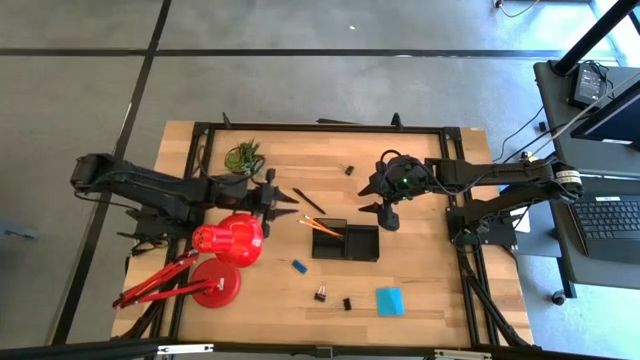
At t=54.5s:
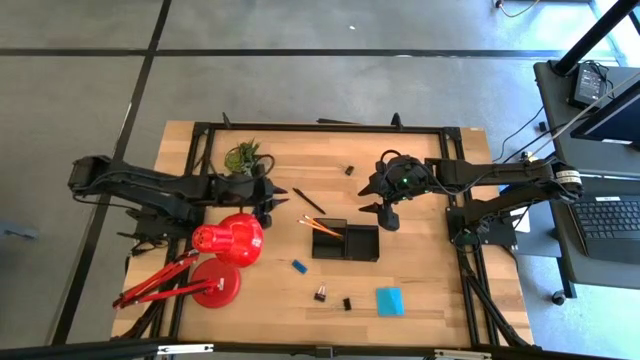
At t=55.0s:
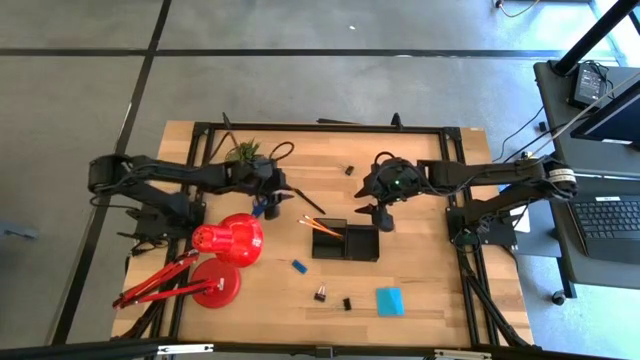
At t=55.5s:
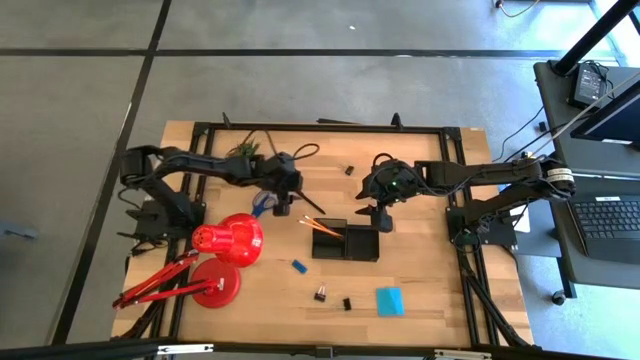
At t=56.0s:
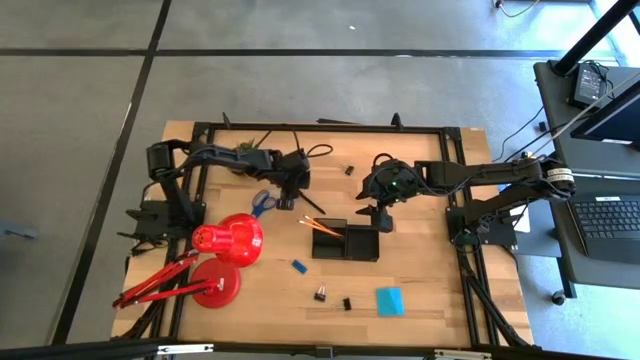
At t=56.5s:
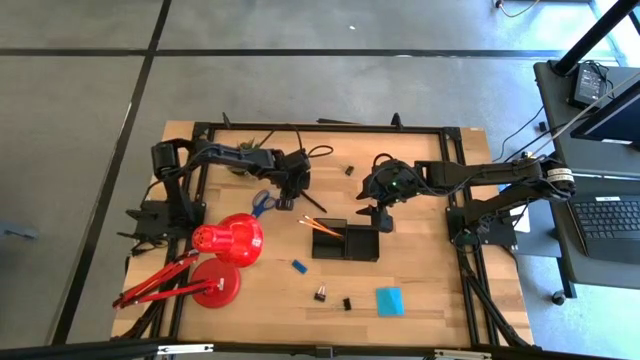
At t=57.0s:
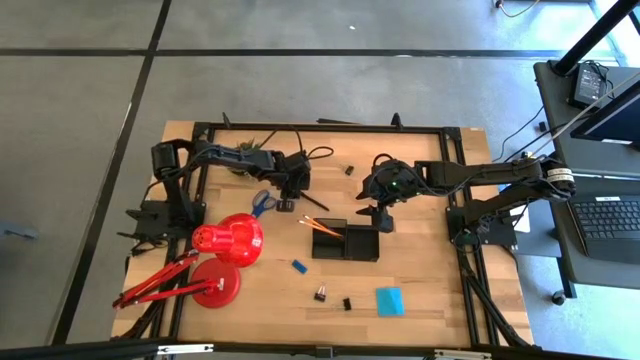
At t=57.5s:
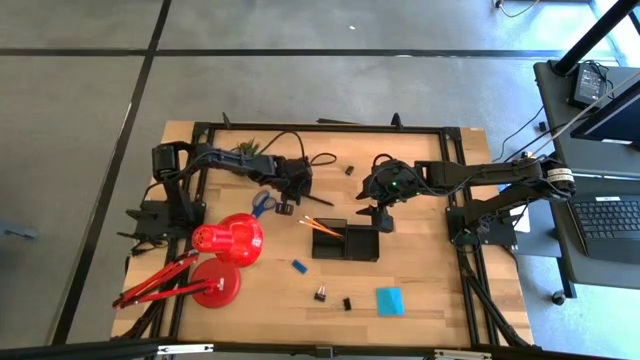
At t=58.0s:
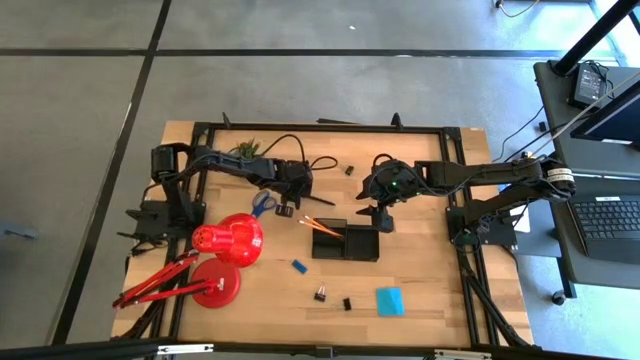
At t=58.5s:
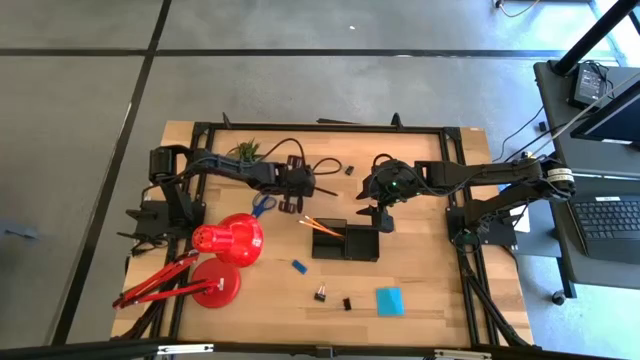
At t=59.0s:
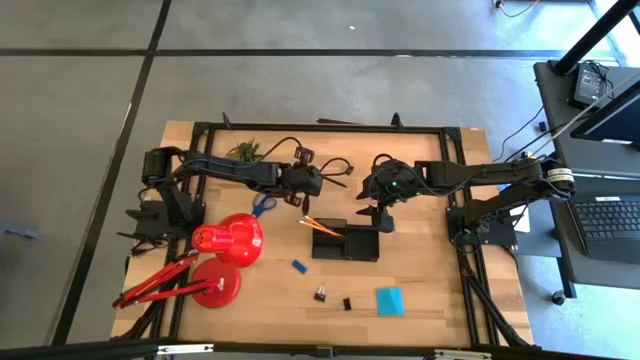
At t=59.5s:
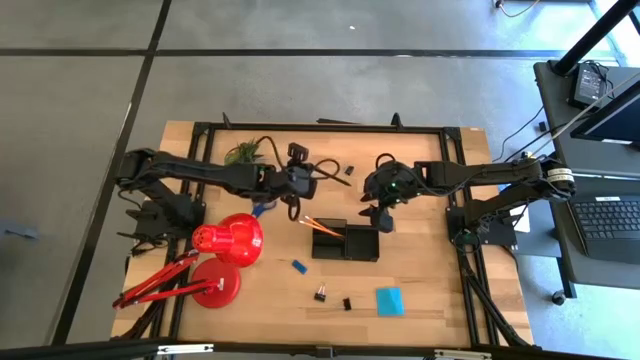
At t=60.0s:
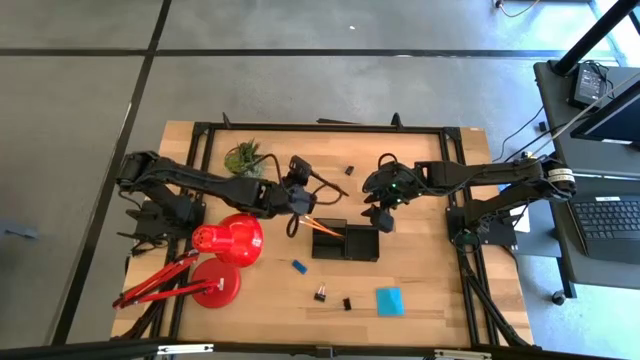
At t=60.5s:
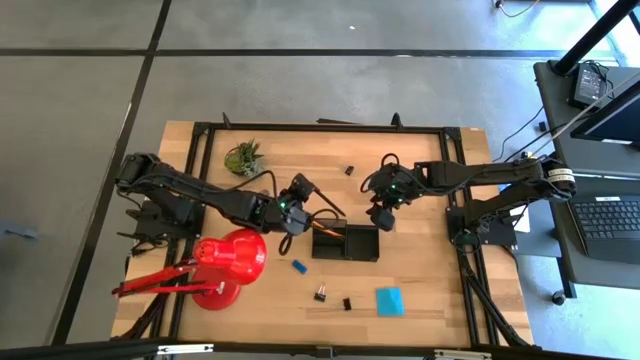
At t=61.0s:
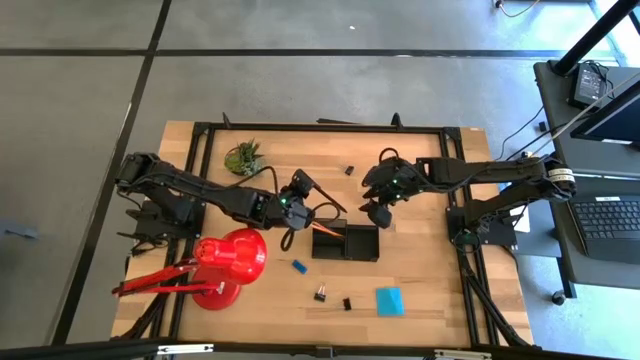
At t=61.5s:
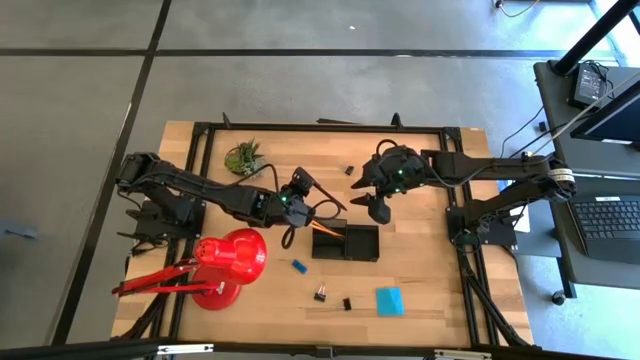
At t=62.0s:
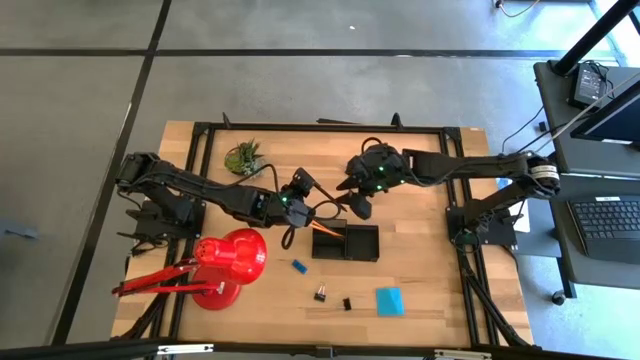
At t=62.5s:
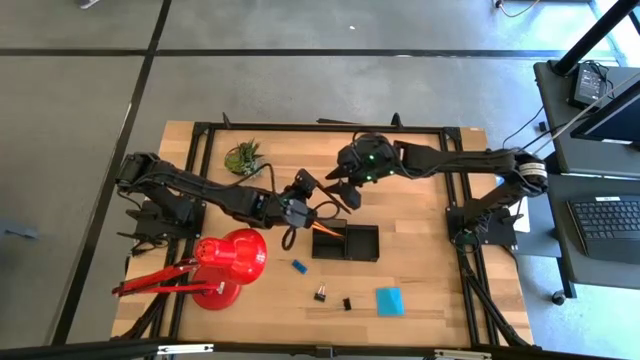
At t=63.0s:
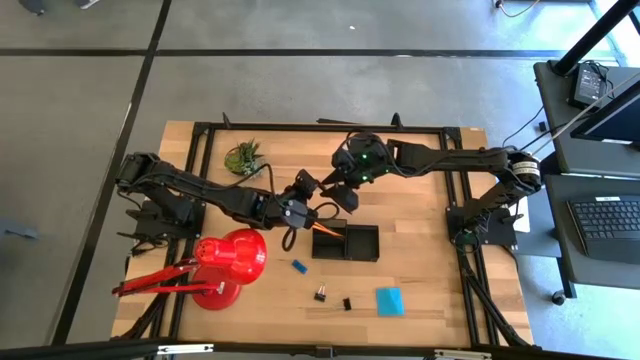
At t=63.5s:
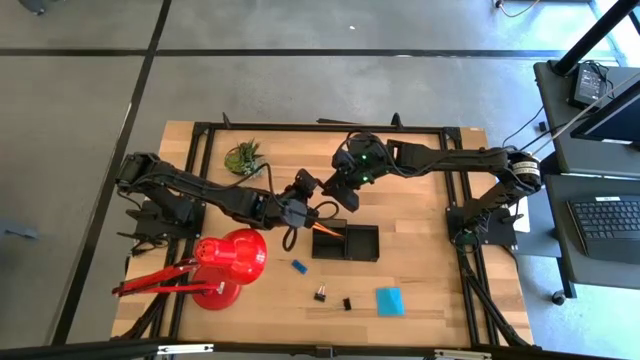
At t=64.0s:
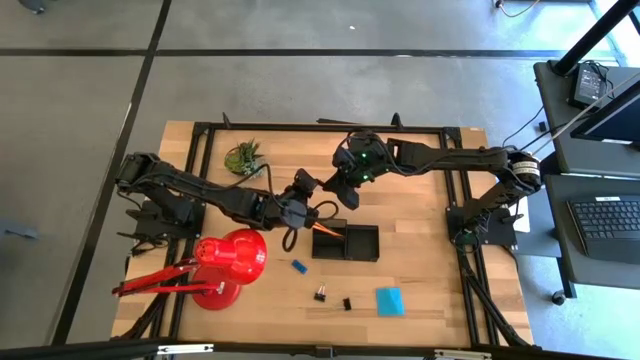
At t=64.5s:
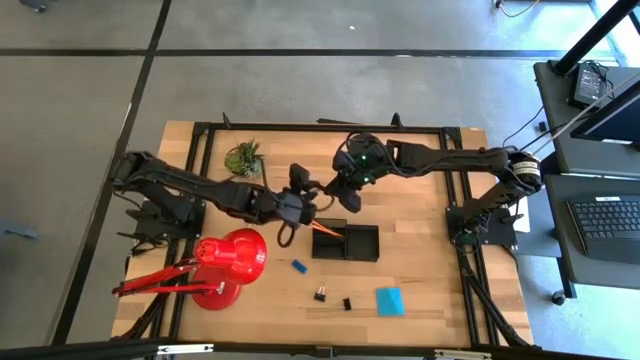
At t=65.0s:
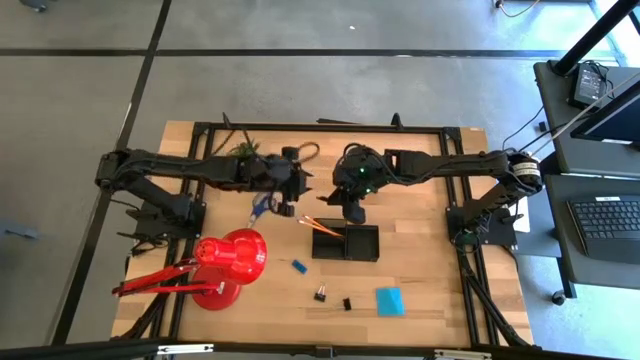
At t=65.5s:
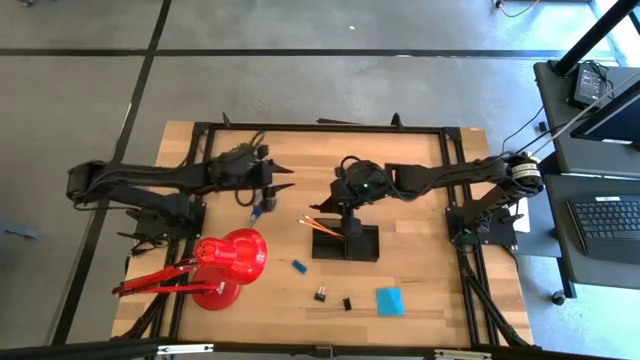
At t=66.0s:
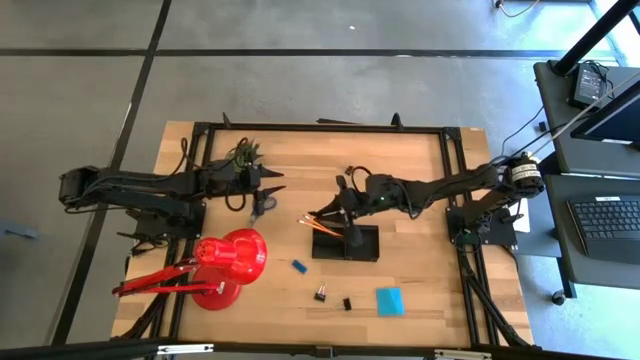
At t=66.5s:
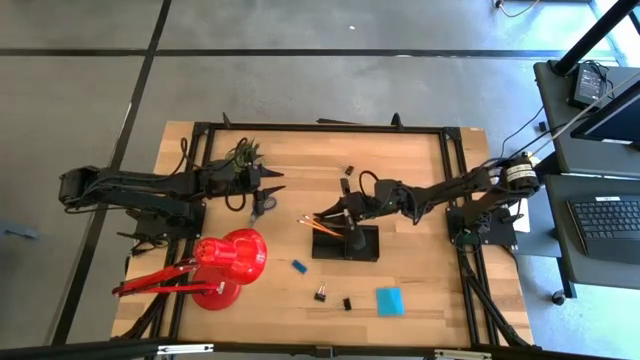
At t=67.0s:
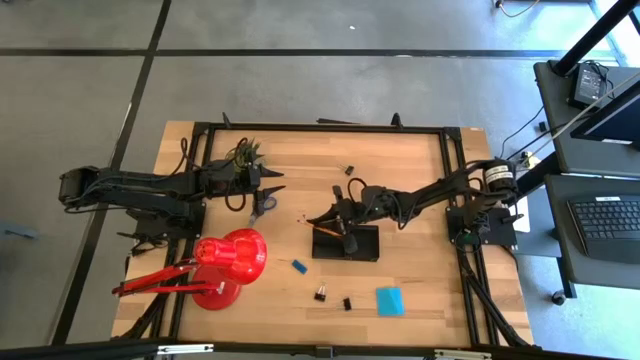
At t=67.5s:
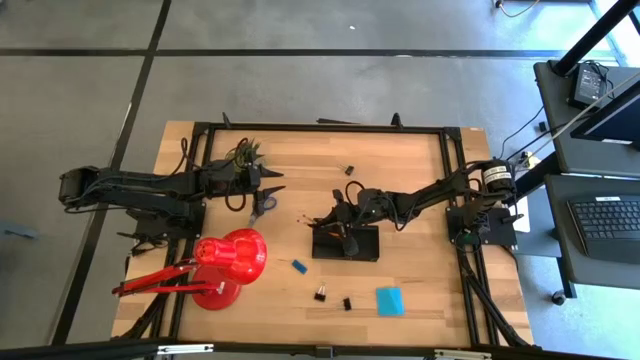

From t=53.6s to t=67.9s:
Task: Pick and place office supplies into organizer
Put the black pen into the black desk organizer

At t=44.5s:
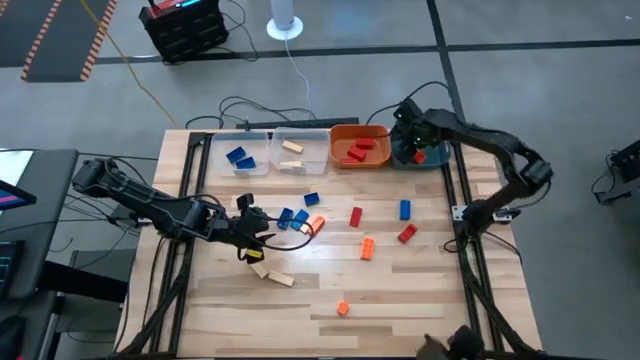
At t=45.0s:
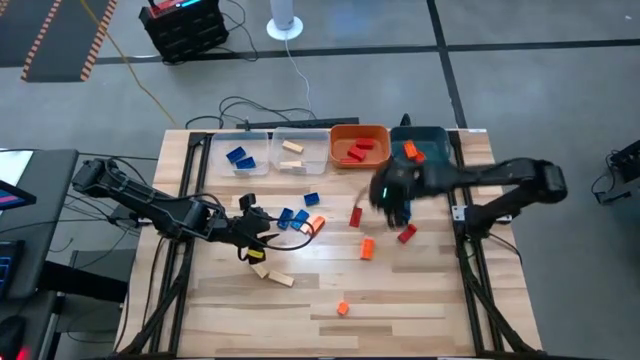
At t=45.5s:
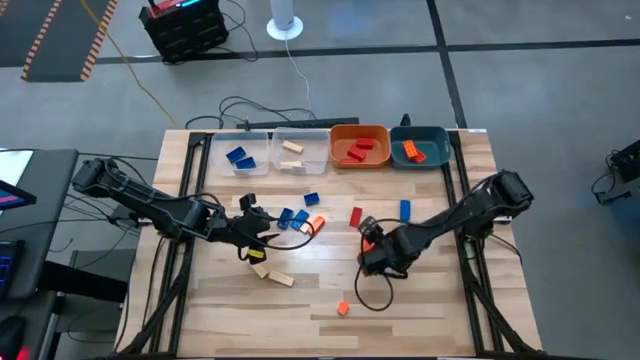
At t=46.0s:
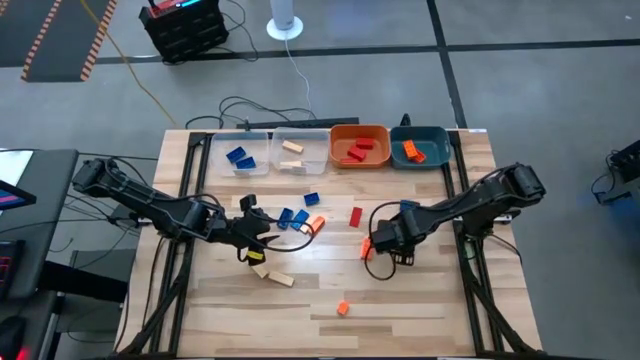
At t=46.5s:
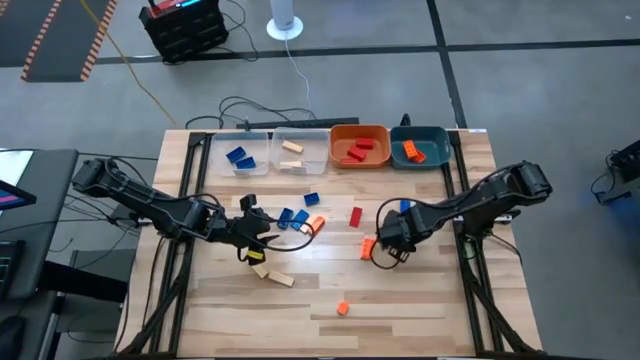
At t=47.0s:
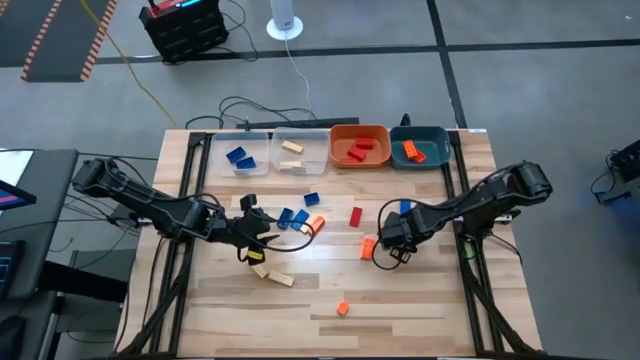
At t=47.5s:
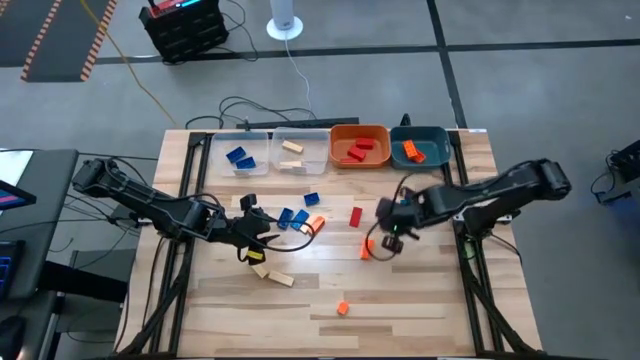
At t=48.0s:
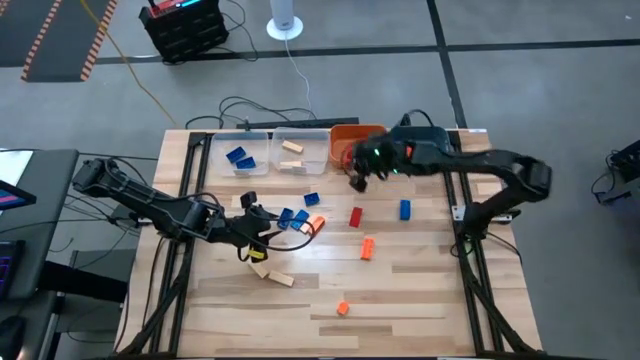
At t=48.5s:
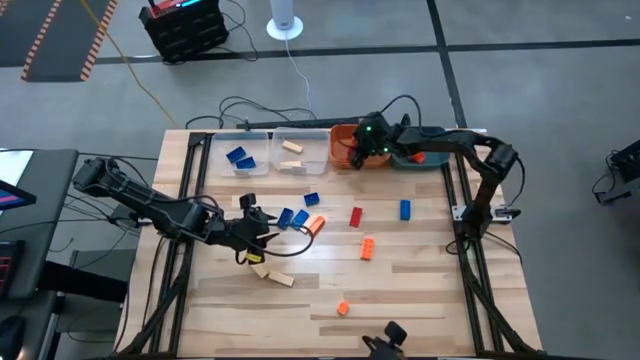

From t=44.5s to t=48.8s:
Task: Sort blocks
Put the red block into the orange bin
